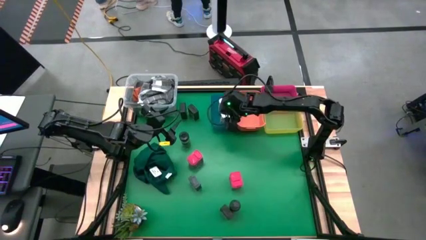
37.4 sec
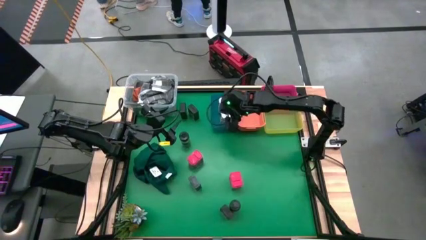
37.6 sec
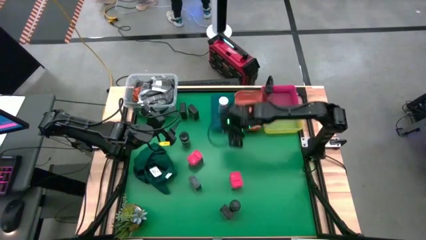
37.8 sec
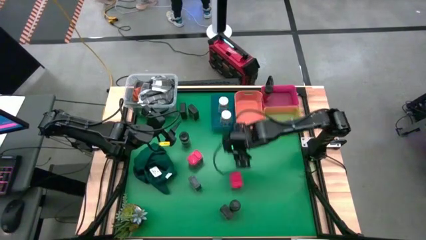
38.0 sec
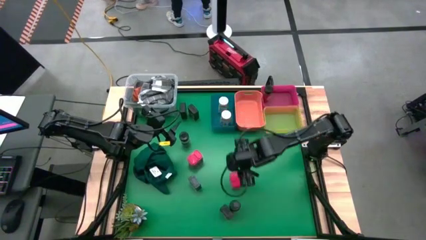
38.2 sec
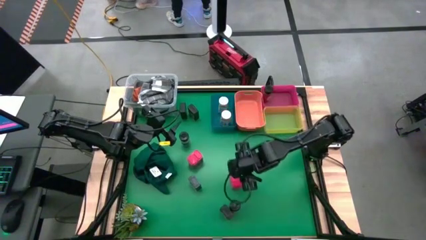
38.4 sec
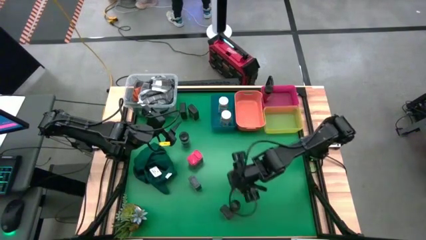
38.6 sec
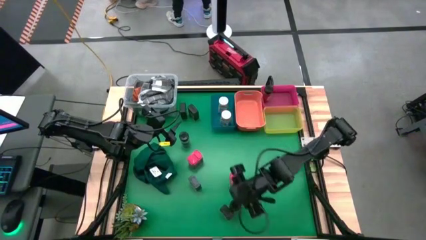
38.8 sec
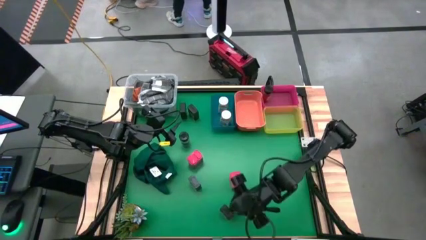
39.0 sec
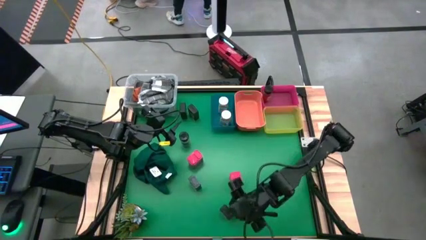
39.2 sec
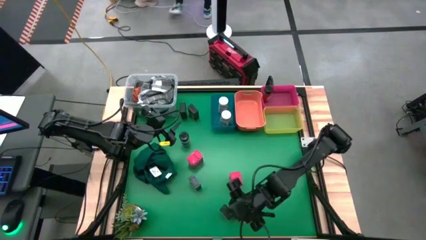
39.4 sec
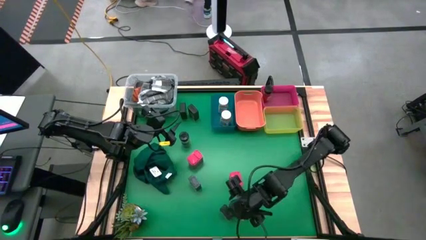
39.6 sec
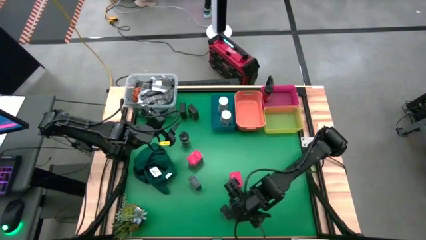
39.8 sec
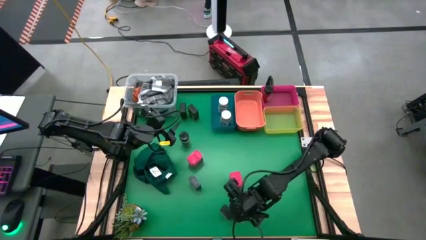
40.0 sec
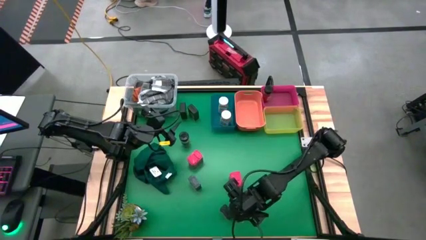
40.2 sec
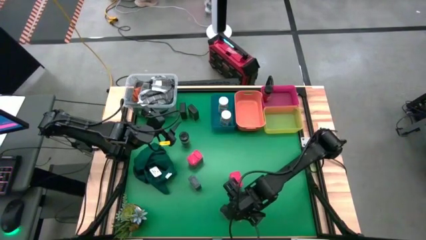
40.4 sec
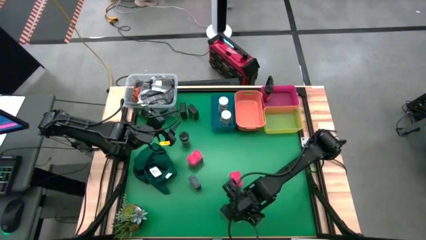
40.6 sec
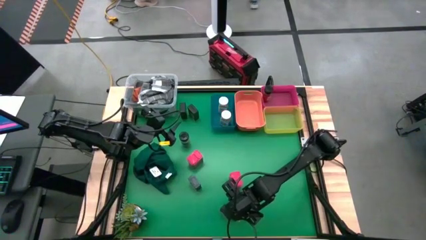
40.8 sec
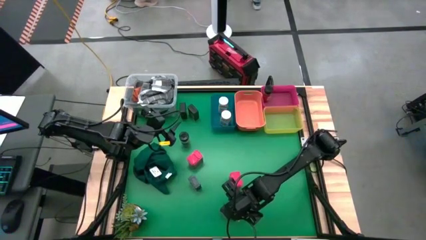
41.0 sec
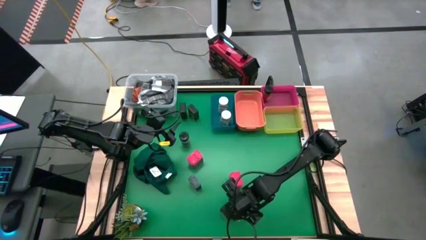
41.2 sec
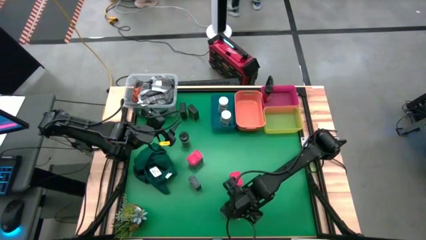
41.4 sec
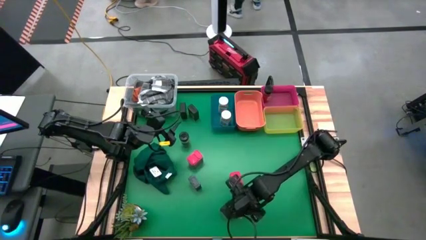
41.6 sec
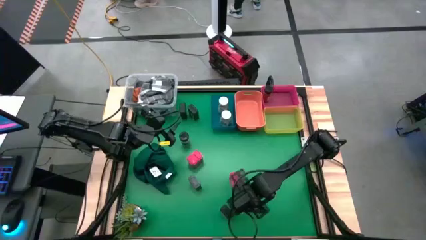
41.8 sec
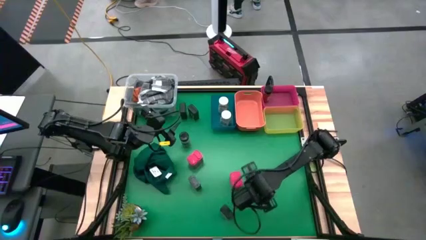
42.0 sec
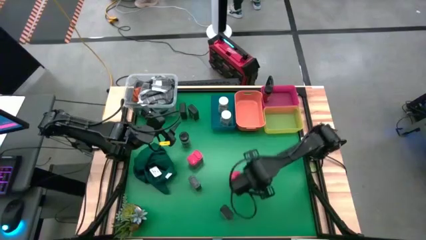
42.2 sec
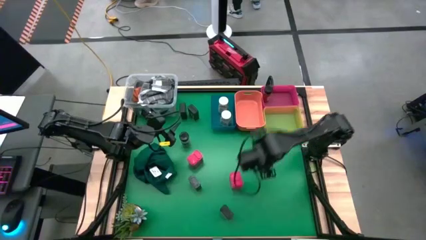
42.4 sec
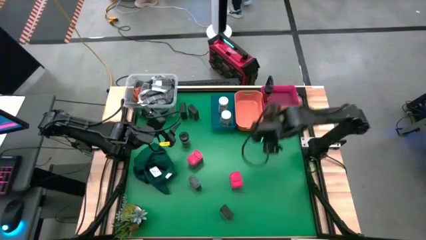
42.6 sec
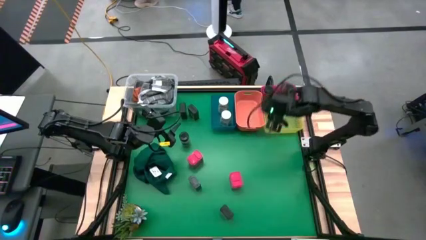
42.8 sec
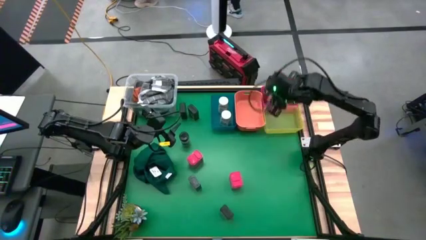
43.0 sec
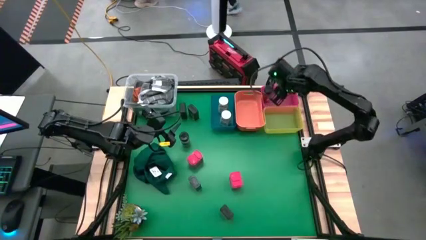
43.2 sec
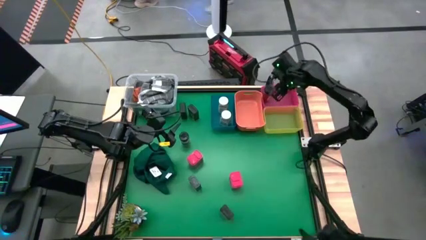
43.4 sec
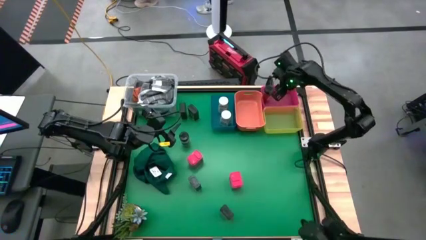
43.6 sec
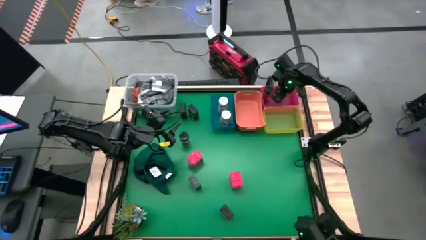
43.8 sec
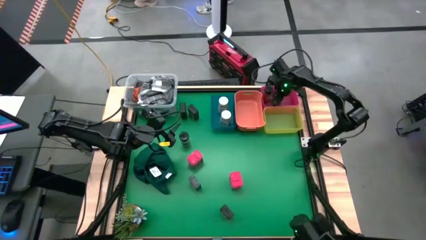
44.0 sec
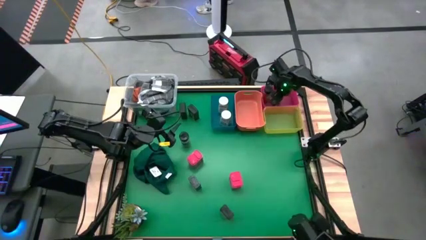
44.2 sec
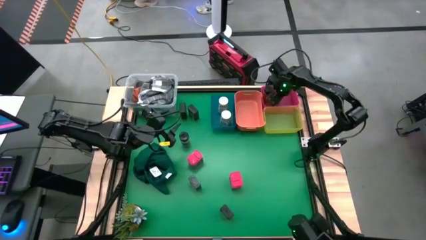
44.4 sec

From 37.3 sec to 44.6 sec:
Task: Sort spices by type
Put the bottom black seasoning bottle into the pink bin

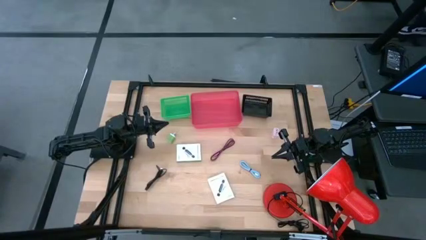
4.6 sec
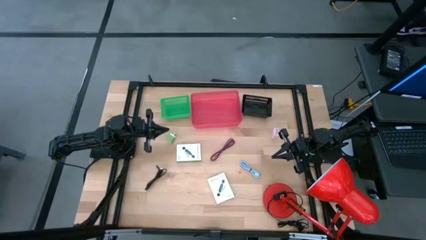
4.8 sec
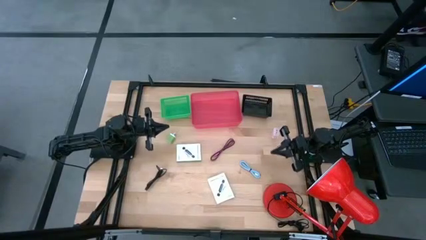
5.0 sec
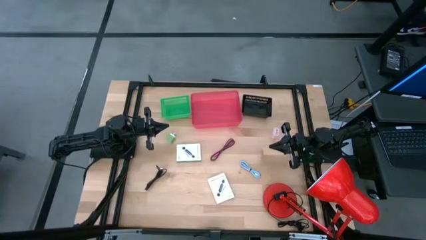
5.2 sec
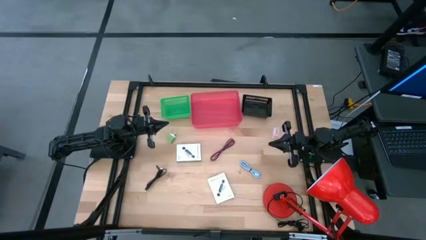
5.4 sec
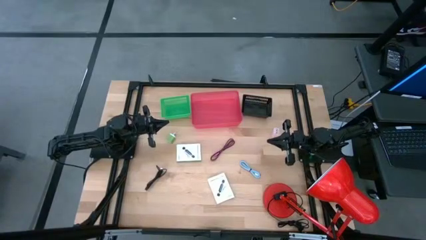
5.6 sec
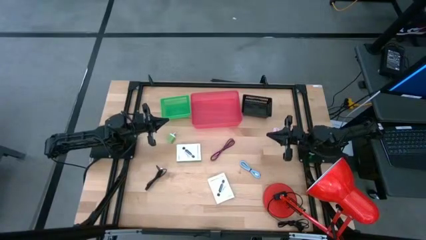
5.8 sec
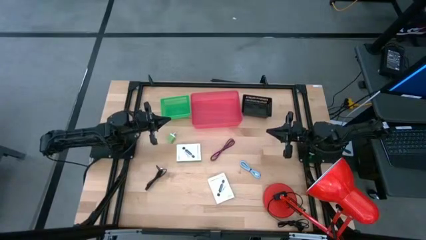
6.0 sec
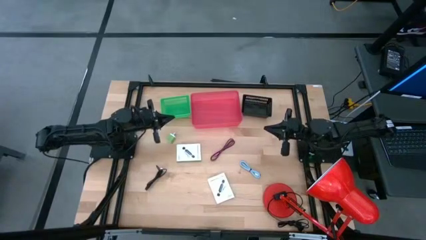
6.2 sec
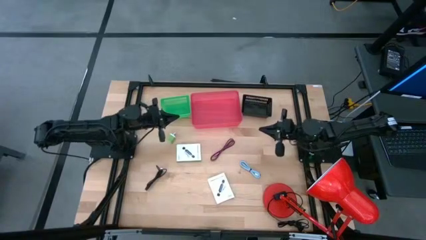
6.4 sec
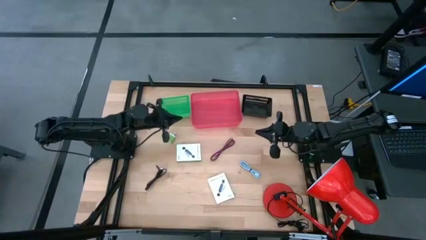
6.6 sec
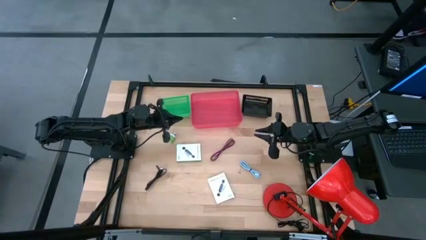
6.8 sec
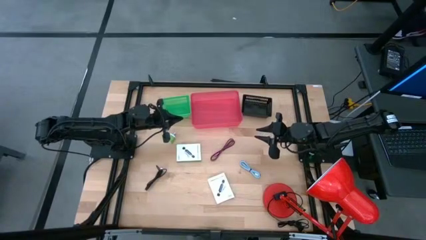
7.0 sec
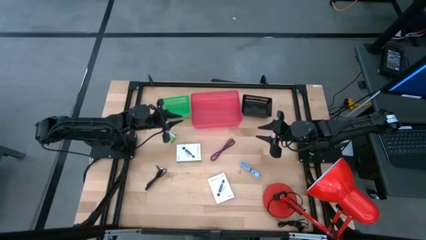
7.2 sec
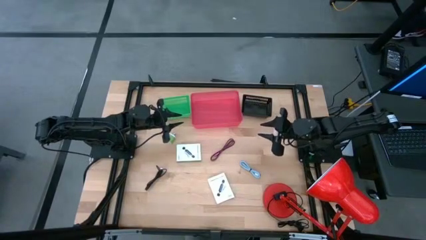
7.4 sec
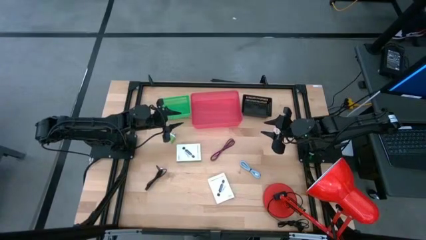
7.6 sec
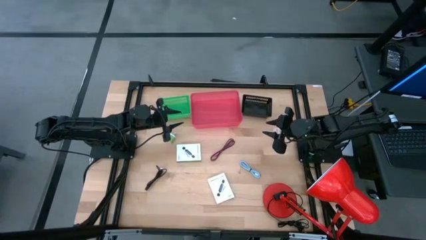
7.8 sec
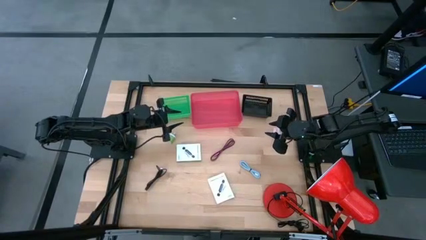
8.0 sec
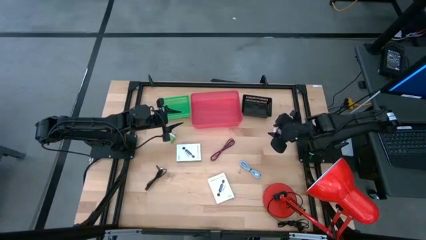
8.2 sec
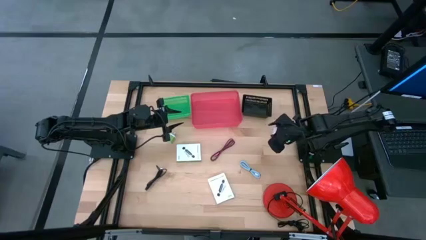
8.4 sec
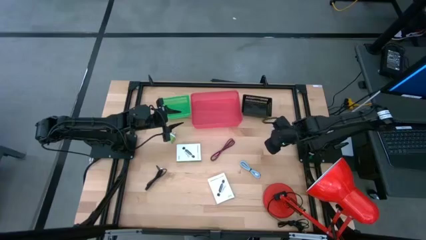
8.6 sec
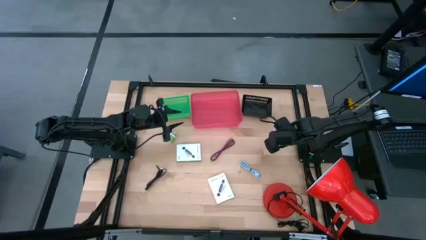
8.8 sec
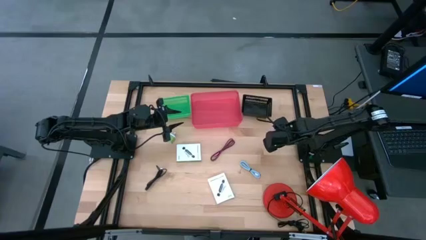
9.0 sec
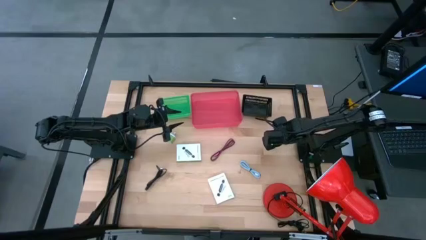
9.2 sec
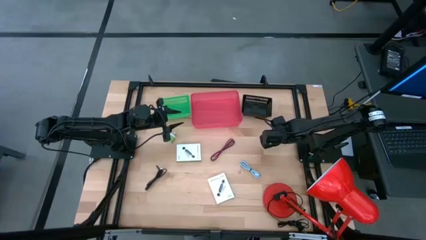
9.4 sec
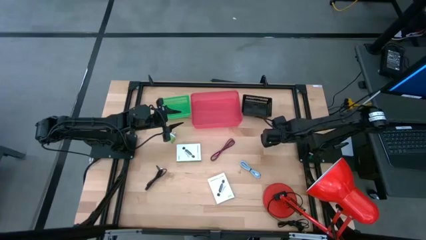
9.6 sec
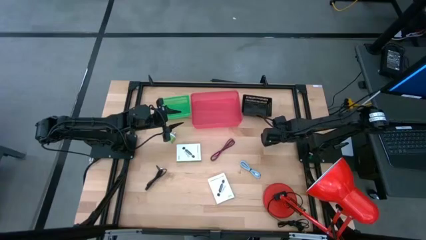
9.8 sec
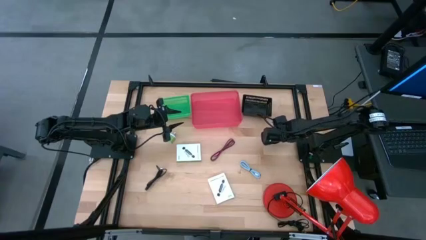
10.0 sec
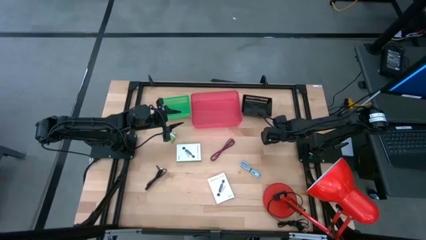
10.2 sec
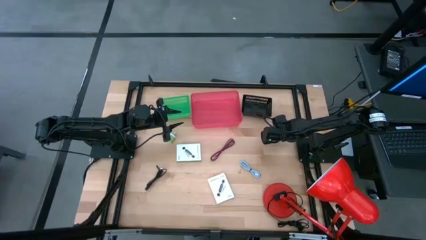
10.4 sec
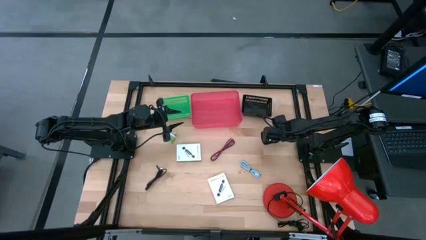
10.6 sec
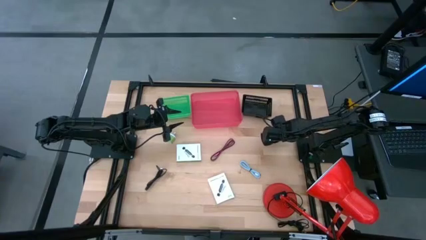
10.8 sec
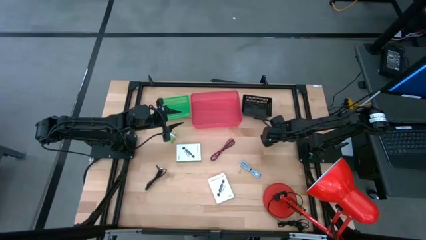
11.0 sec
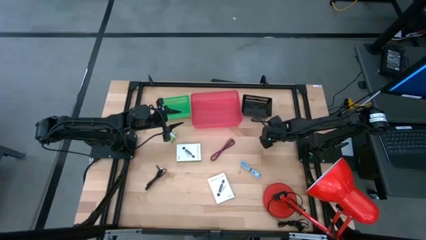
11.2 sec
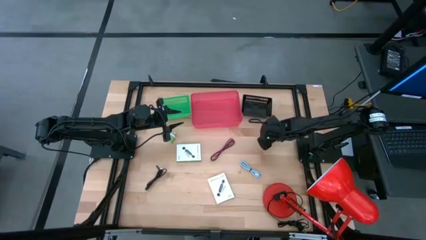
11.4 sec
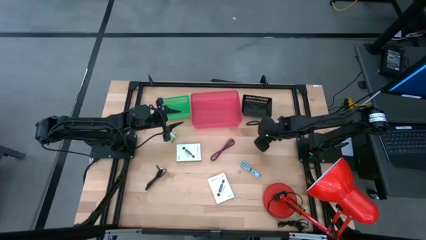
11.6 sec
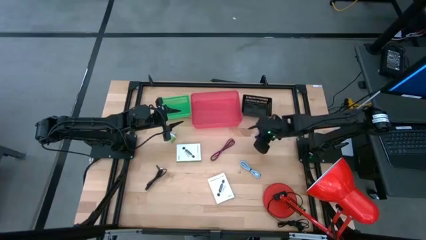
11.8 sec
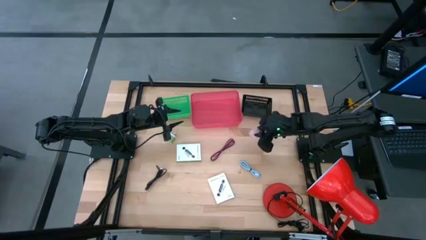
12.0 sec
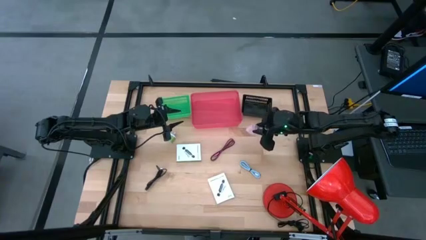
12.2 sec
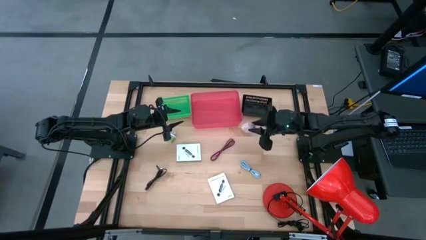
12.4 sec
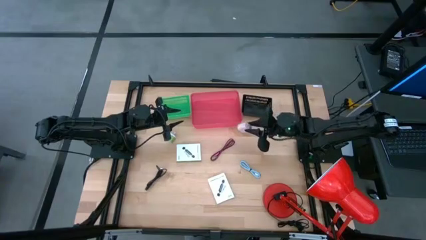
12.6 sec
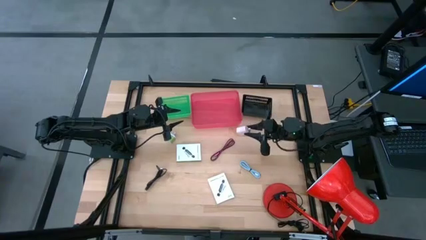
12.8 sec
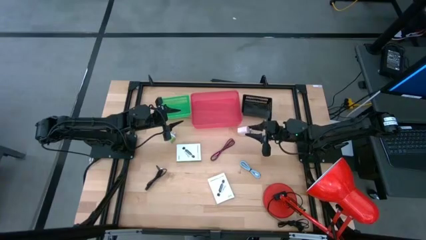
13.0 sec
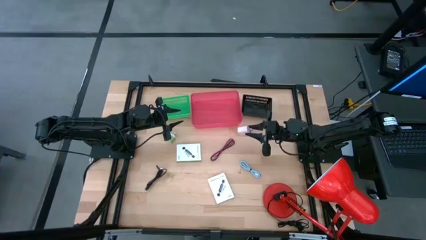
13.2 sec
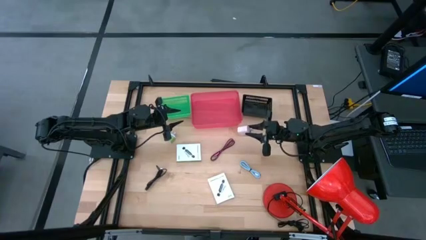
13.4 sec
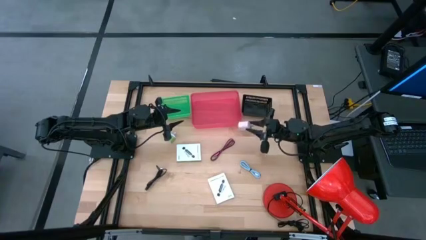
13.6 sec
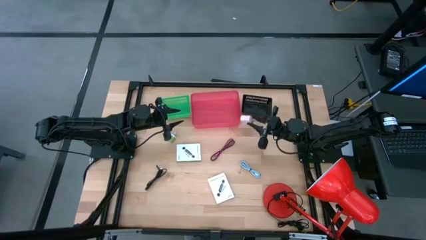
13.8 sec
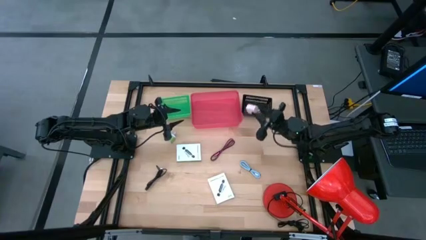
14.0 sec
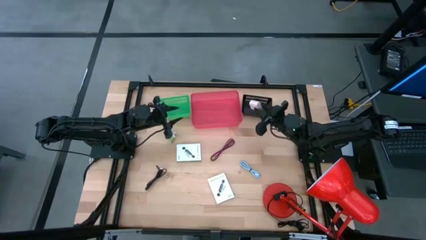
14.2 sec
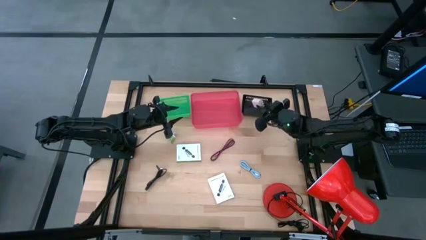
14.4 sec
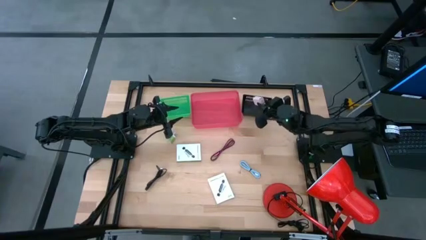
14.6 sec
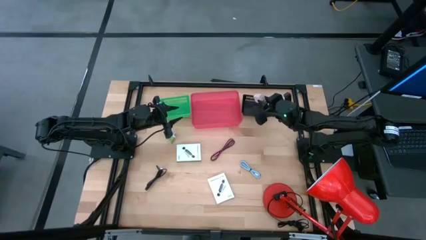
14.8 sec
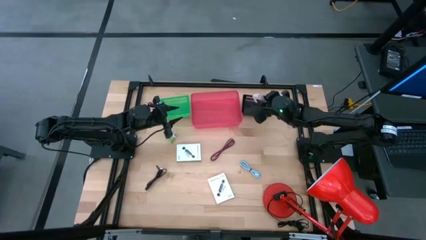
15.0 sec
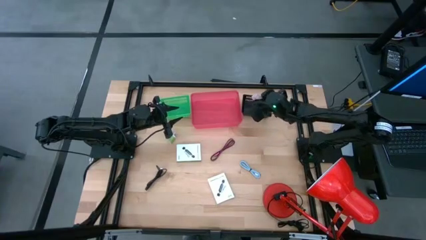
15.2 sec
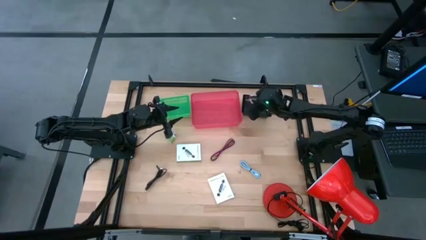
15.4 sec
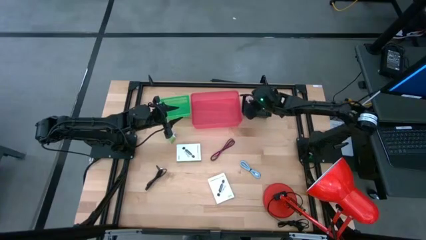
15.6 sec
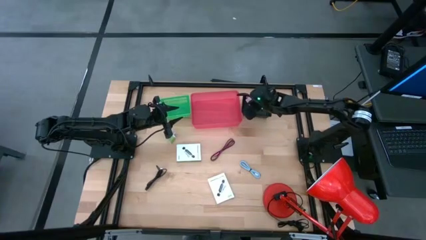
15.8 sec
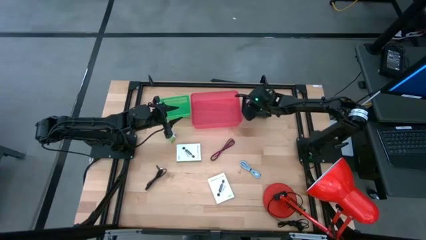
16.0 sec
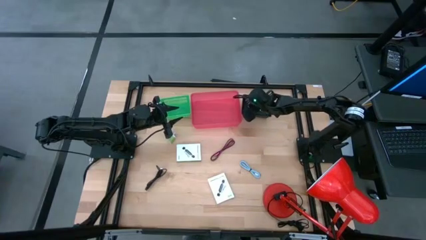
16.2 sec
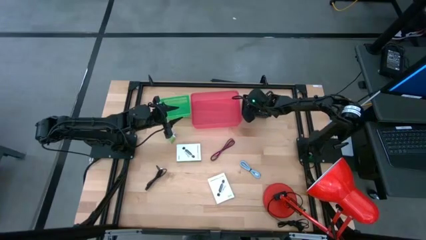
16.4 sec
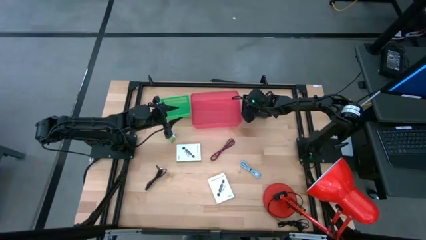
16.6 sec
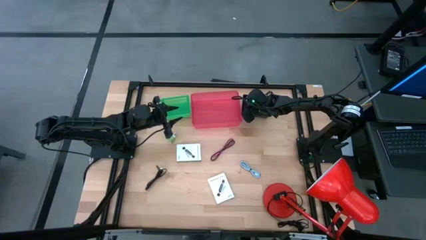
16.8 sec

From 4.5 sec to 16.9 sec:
Task: Pick and place items into bin
Put the light pink charger adapter into the black bin
